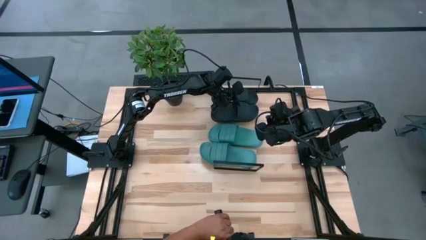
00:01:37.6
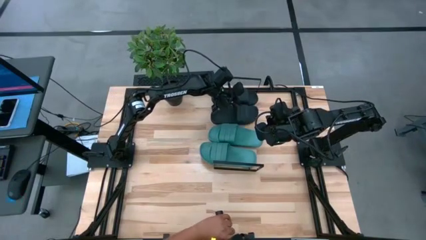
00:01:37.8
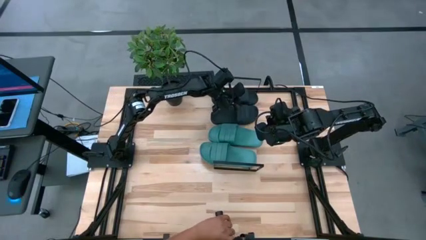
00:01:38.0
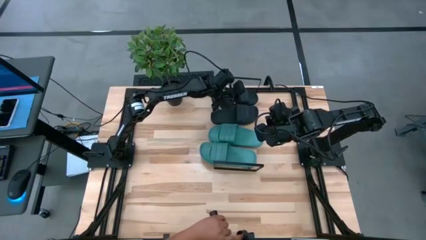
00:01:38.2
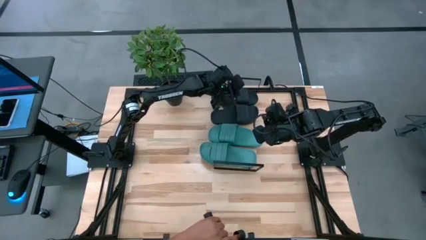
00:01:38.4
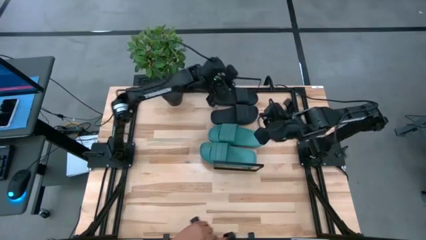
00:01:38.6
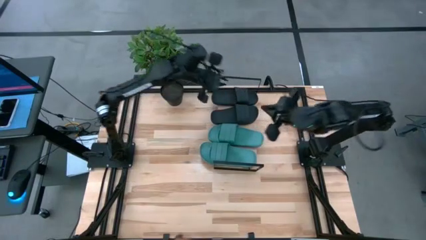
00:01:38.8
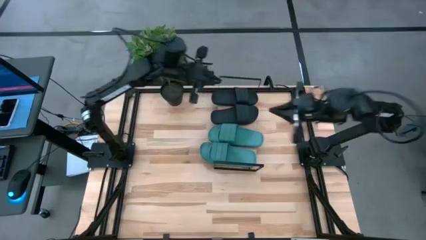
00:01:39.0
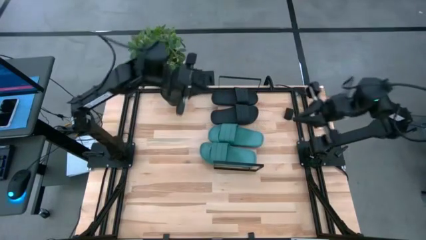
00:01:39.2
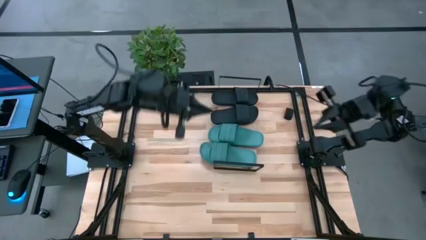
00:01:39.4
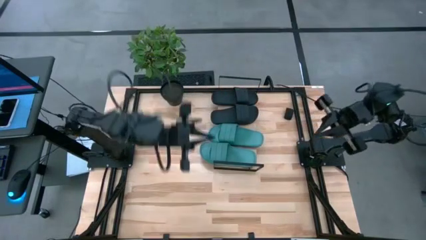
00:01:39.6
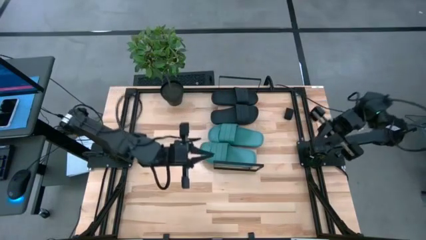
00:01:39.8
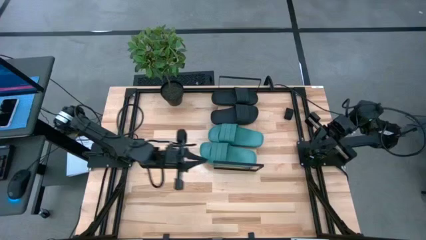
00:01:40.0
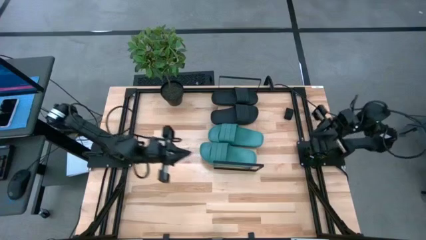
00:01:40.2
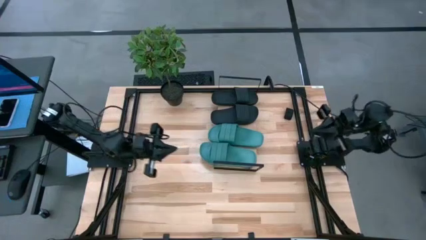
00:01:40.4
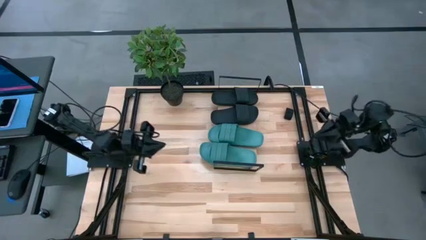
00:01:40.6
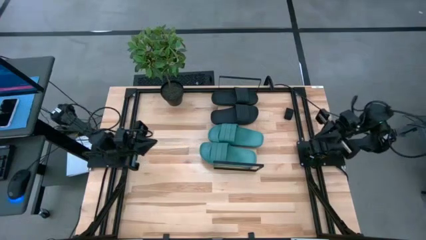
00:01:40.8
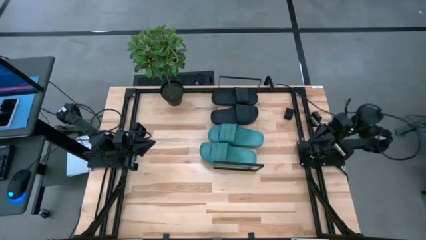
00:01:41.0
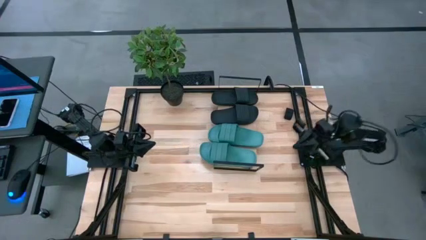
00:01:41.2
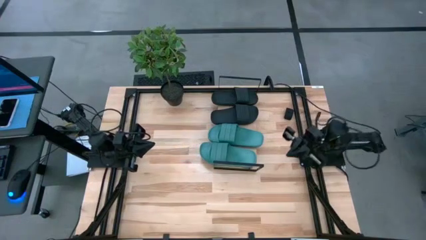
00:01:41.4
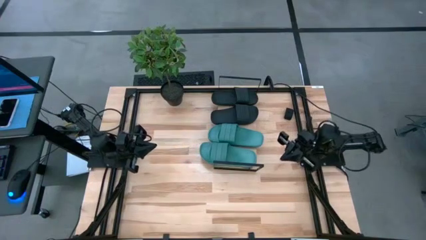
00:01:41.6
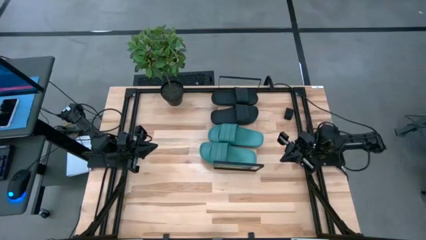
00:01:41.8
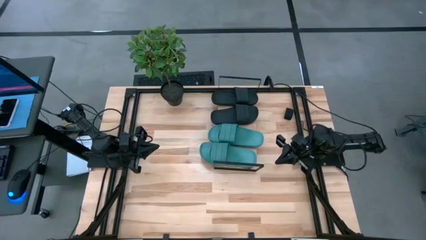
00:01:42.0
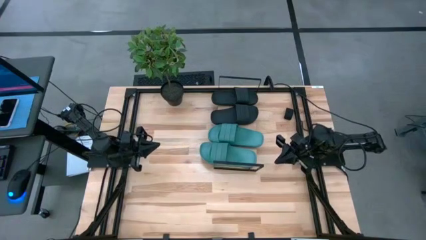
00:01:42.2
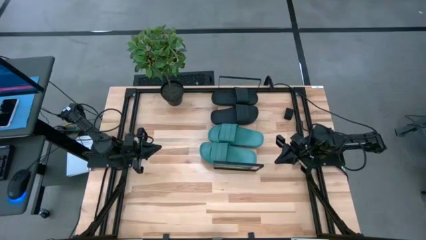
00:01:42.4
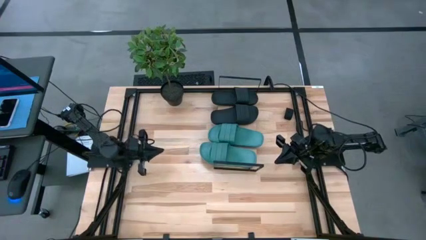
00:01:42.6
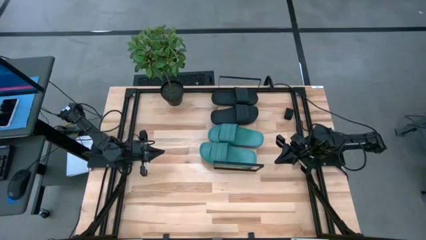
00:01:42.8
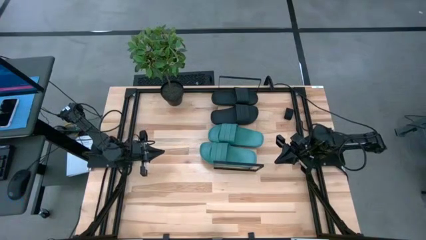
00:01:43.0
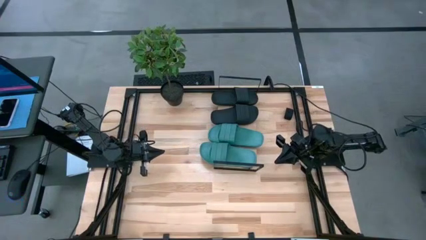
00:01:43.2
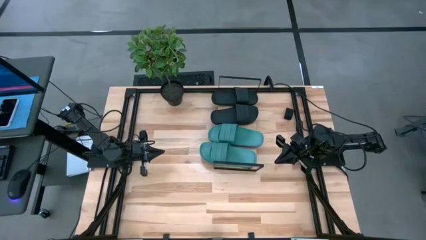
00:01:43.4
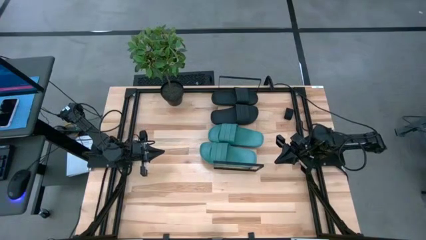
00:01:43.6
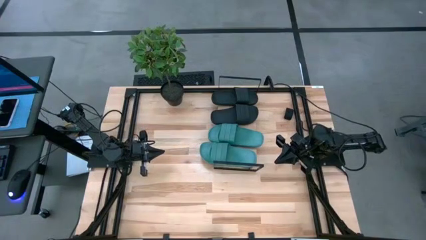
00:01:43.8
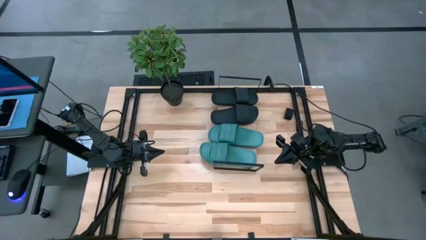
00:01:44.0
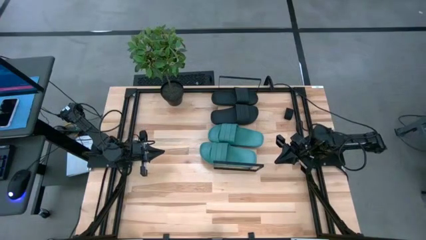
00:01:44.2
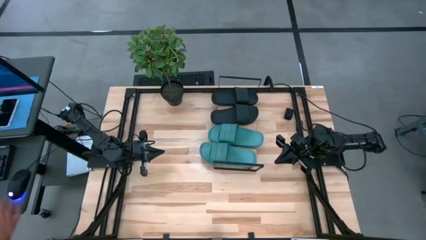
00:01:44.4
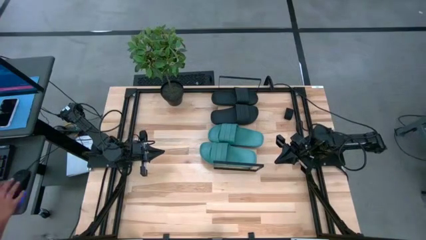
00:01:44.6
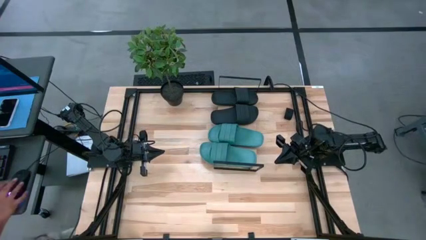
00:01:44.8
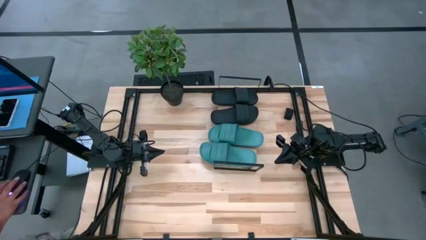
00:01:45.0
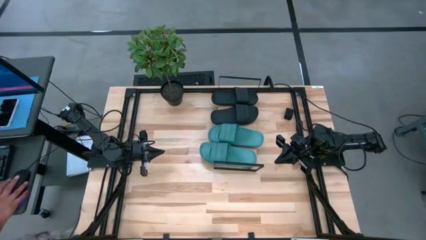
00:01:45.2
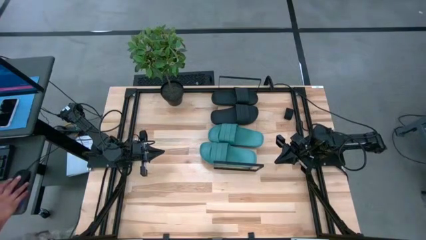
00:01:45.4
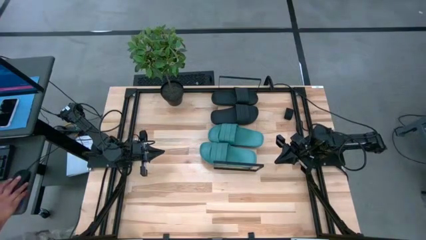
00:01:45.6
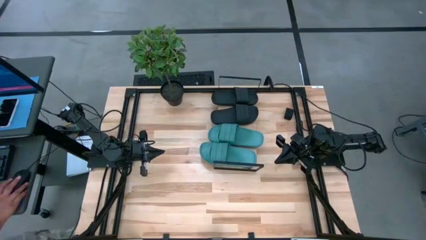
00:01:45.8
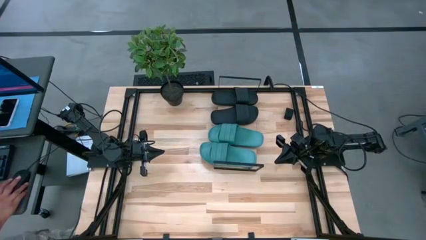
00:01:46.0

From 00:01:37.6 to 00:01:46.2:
Task: Pick and place slides into the shelf
Return to Home Position

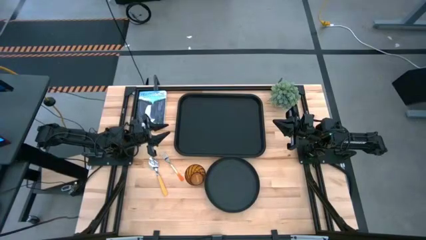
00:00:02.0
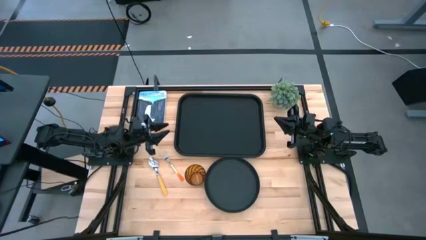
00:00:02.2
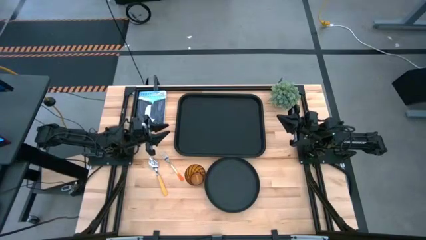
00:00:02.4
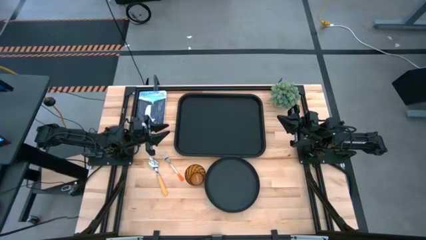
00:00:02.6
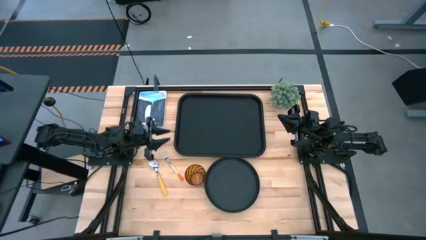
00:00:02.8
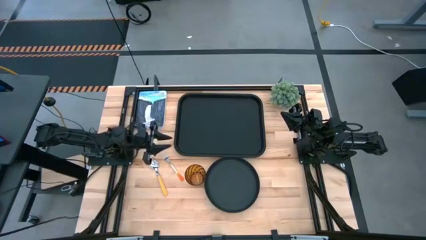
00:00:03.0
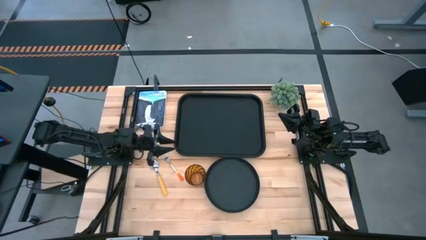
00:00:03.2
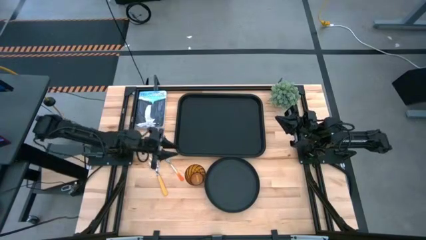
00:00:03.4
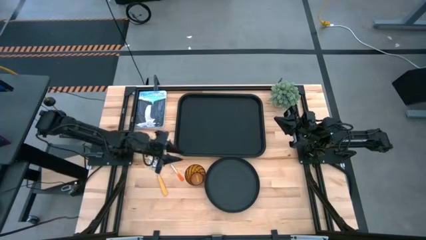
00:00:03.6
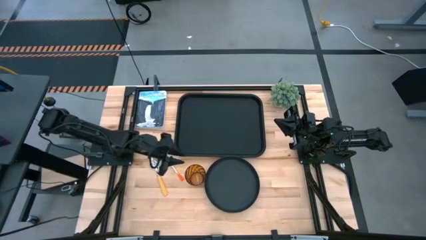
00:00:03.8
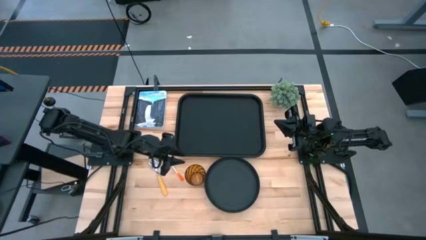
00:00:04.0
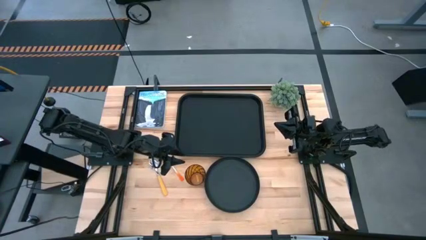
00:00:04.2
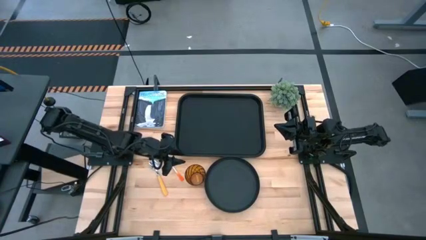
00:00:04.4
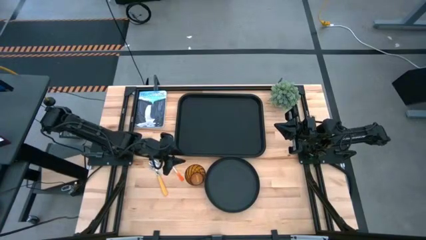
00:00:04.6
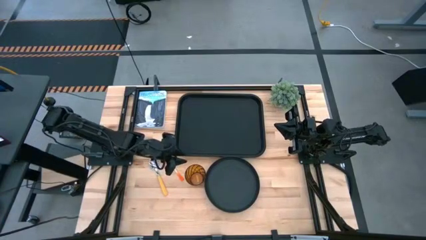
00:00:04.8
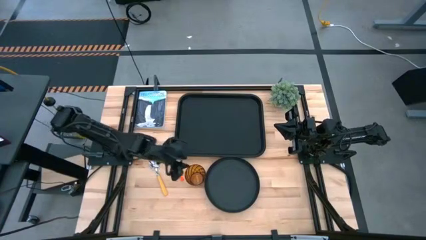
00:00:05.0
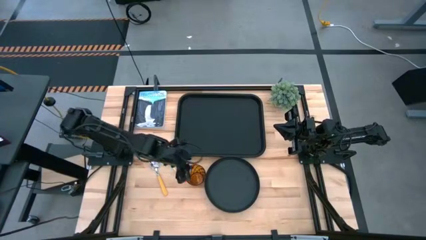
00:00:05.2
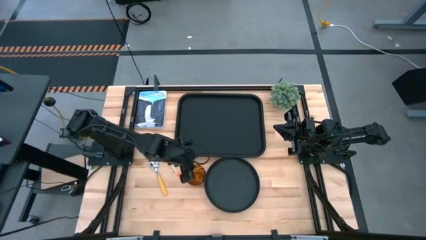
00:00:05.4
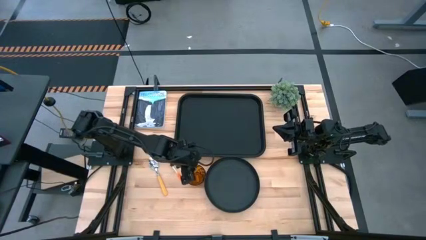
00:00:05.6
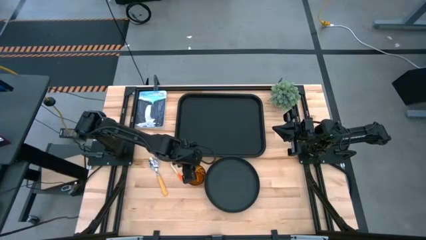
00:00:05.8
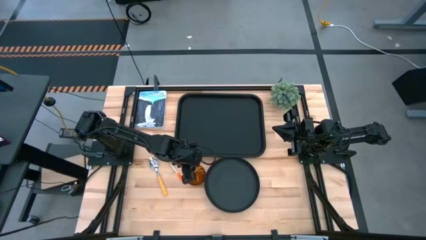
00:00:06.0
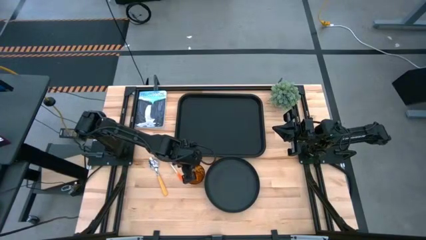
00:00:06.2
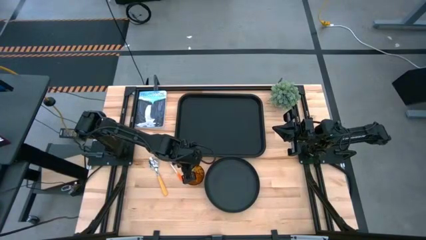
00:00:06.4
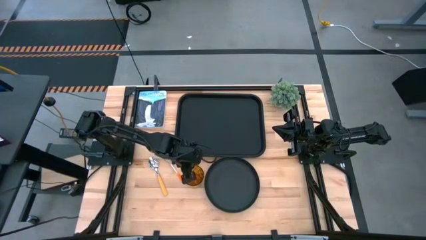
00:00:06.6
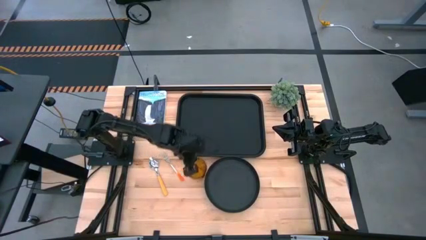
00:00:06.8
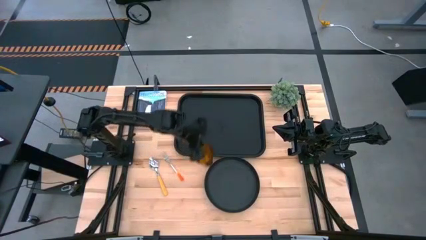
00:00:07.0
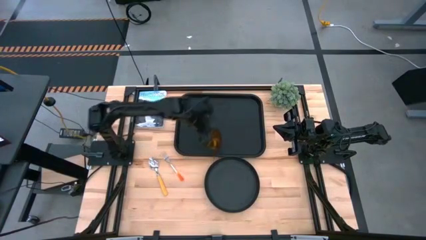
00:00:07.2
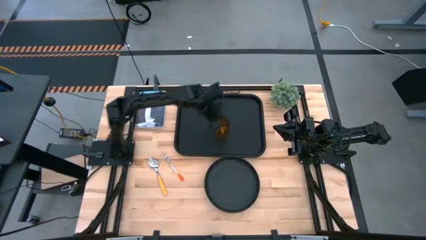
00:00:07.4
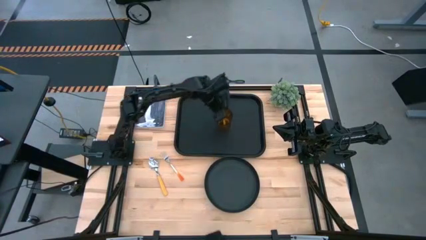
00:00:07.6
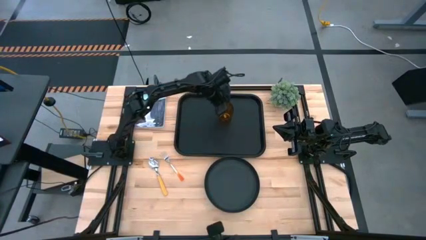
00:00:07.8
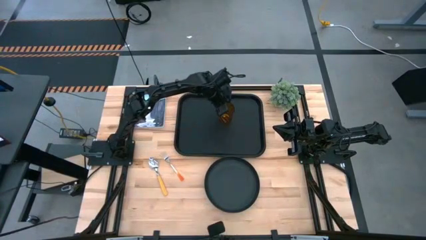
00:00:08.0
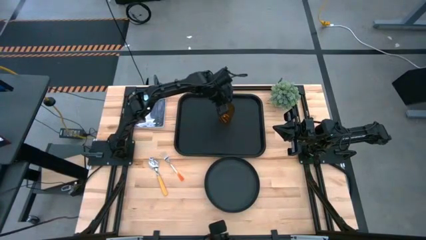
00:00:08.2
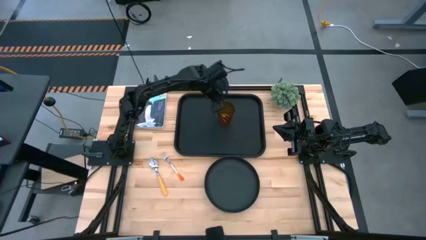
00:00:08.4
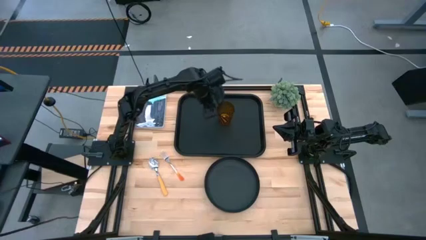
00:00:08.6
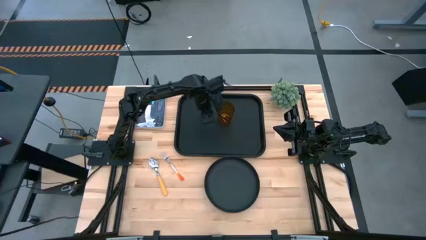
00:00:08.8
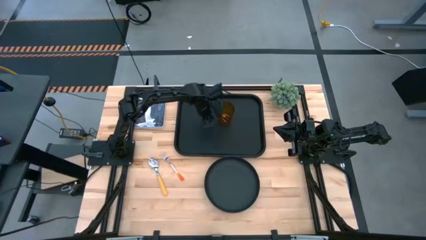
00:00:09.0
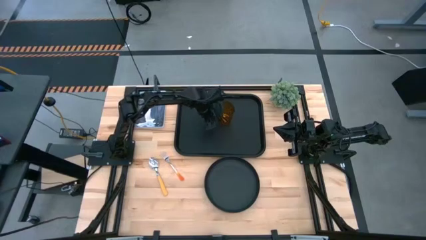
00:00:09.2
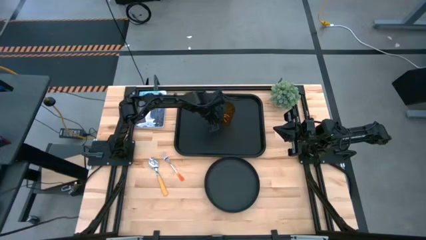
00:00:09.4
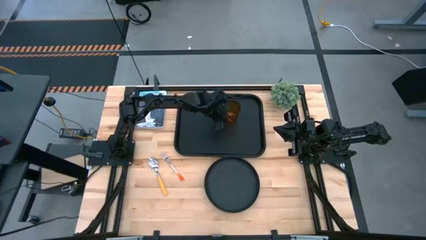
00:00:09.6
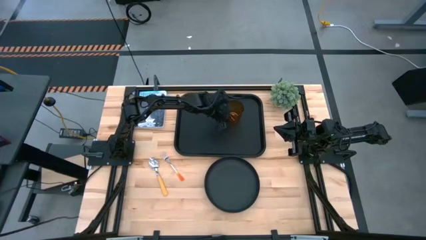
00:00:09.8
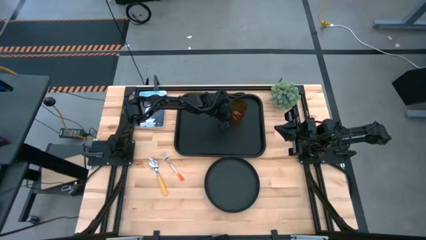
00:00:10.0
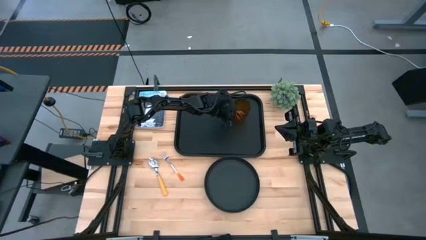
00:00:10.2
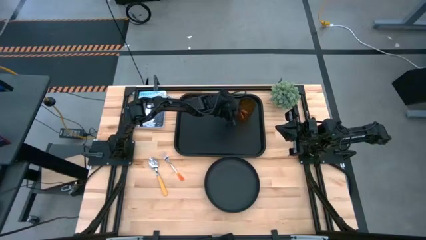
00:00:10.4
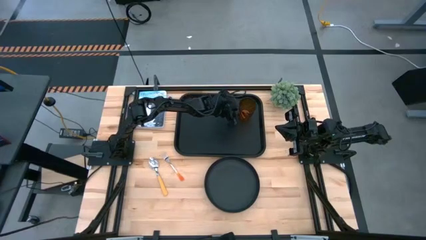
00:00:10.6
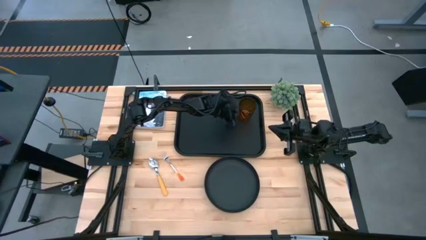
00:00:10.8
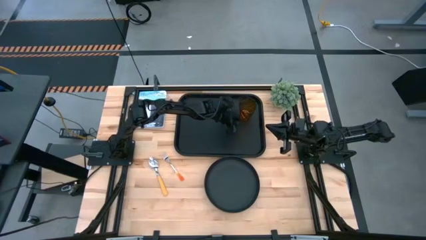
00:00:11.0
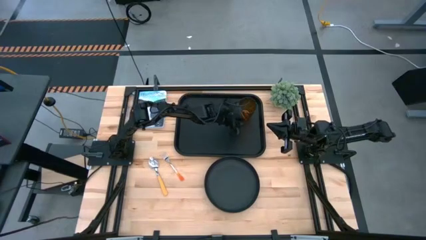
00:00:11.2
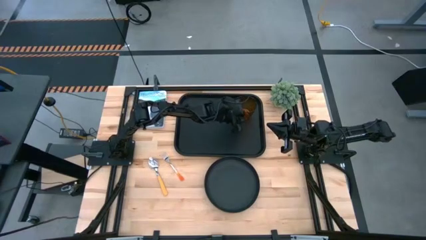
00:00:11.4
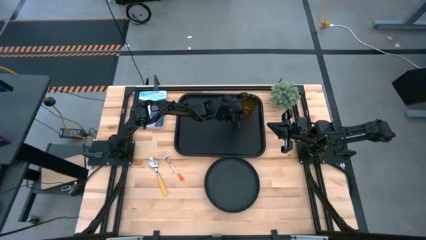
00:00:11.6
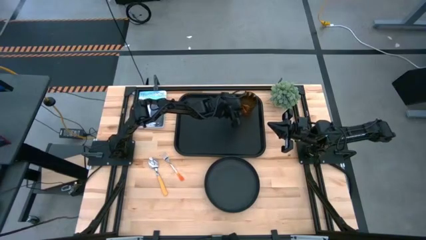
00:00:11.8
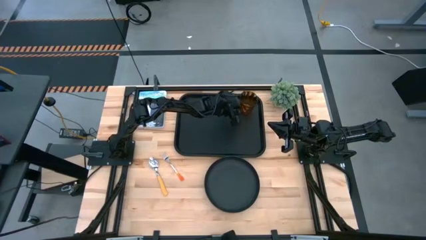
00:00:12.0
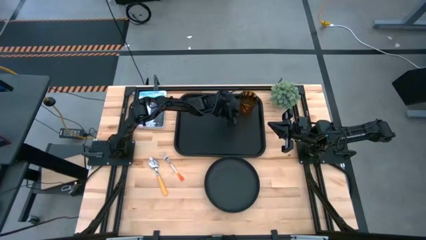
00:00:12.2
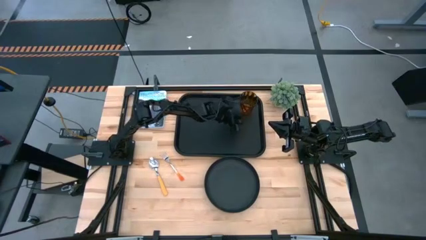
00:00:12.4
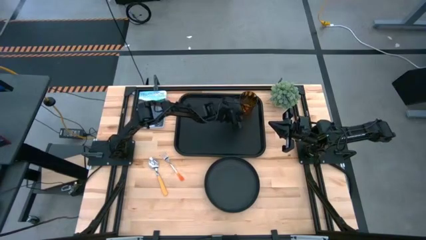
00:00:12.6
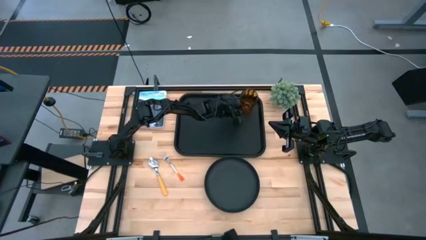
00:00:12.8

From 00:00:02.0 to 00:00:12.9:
Task: Pick and place plate/cup/fork/spoon on tray
Put the orange drinking glass on the top right corner of the black serving tray
